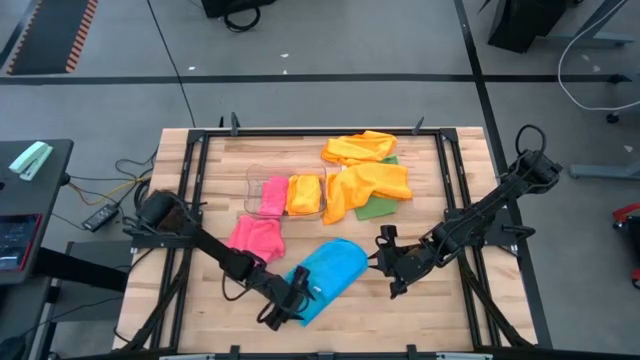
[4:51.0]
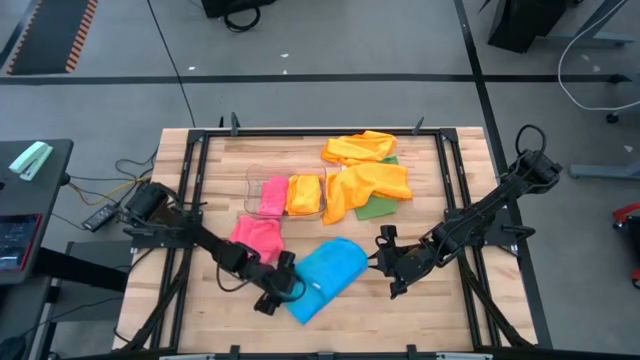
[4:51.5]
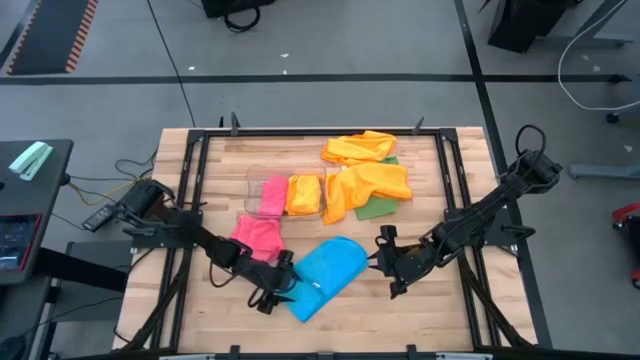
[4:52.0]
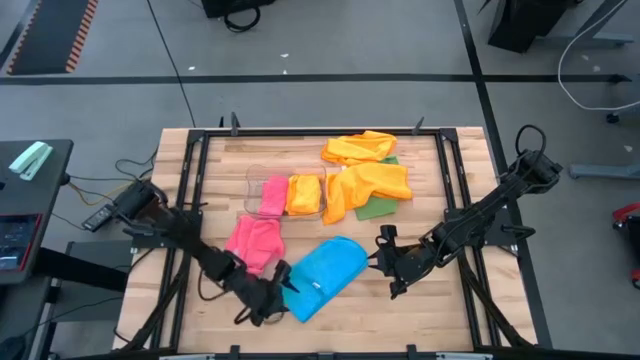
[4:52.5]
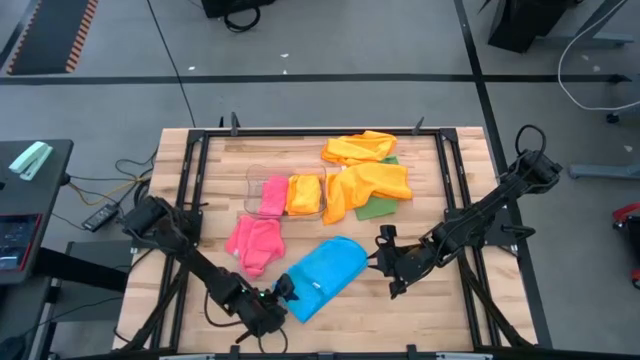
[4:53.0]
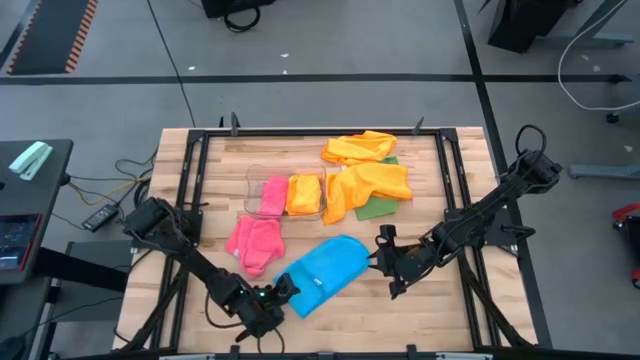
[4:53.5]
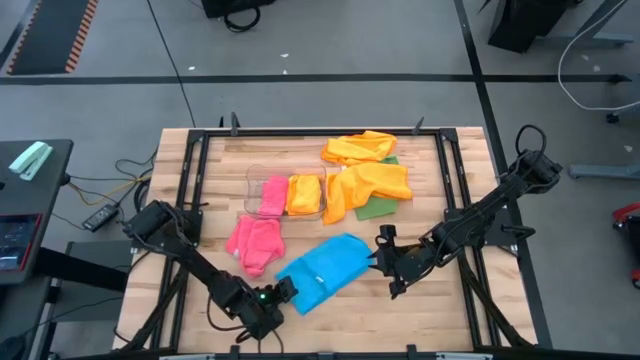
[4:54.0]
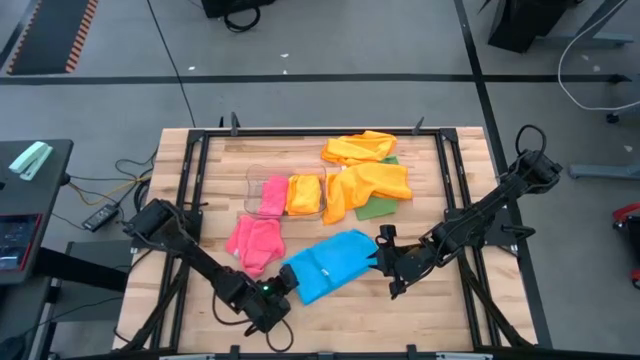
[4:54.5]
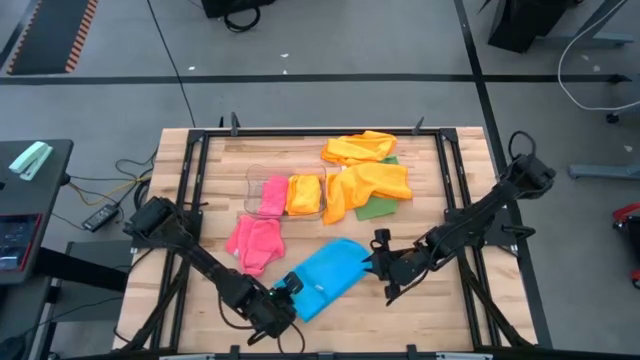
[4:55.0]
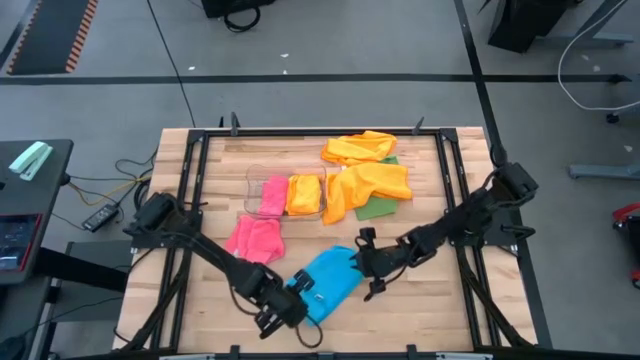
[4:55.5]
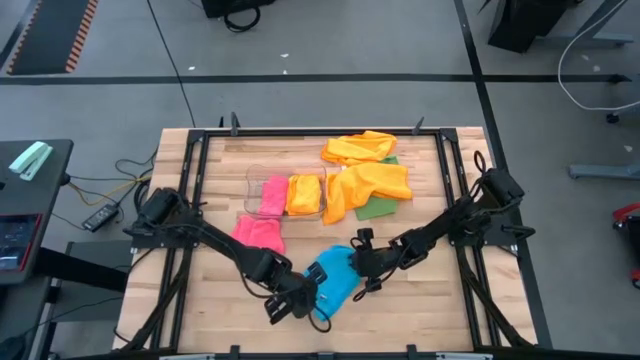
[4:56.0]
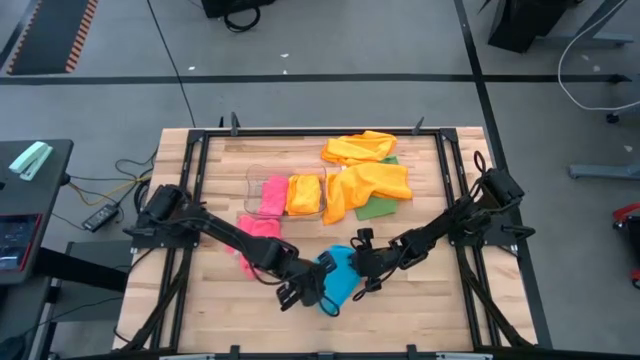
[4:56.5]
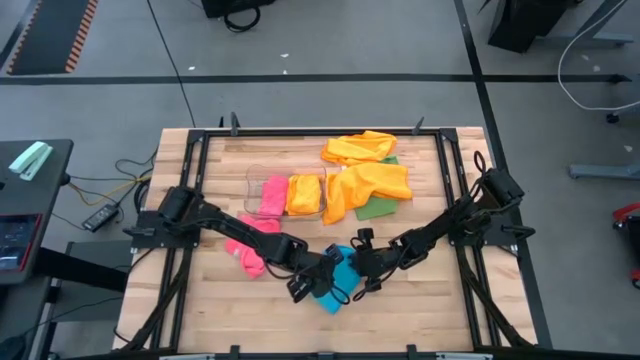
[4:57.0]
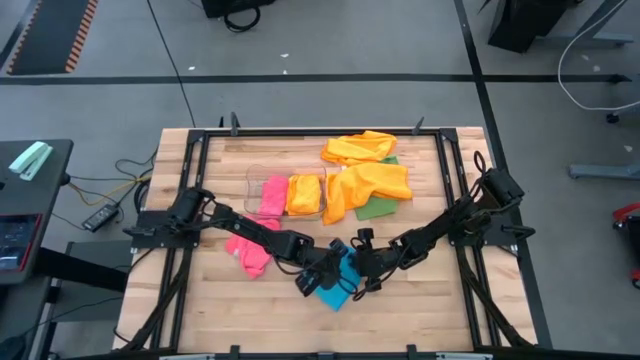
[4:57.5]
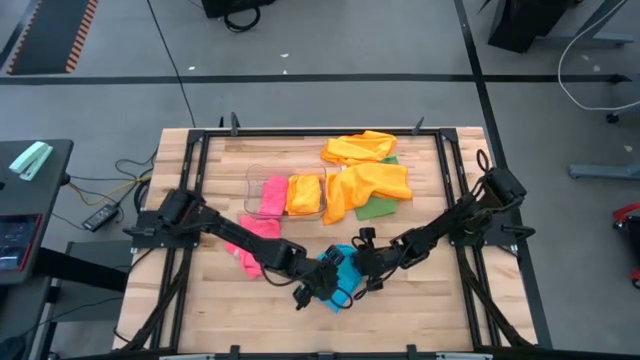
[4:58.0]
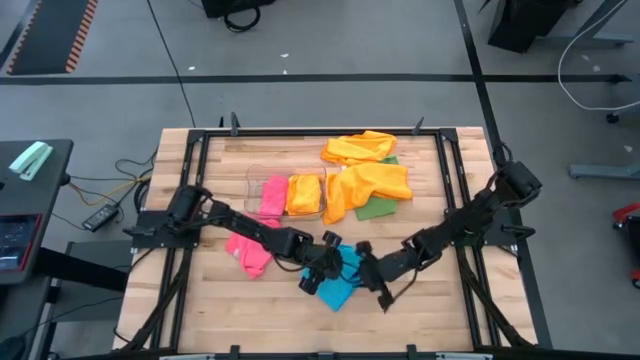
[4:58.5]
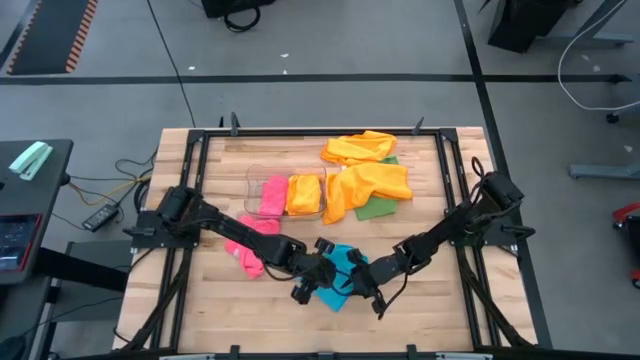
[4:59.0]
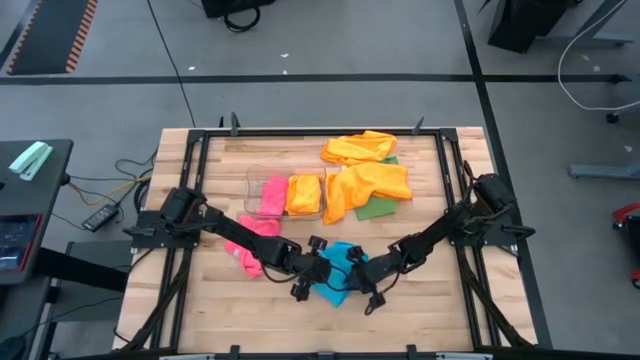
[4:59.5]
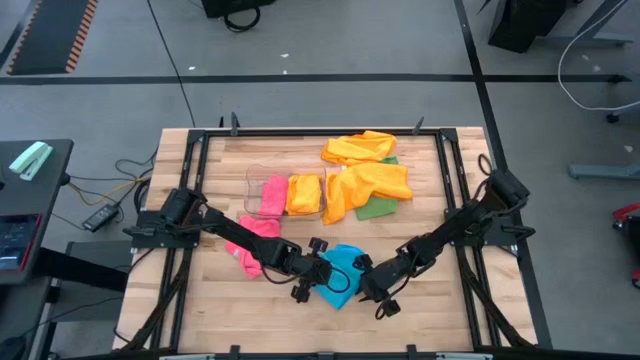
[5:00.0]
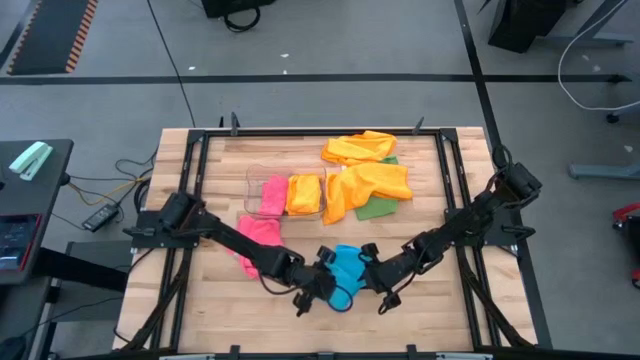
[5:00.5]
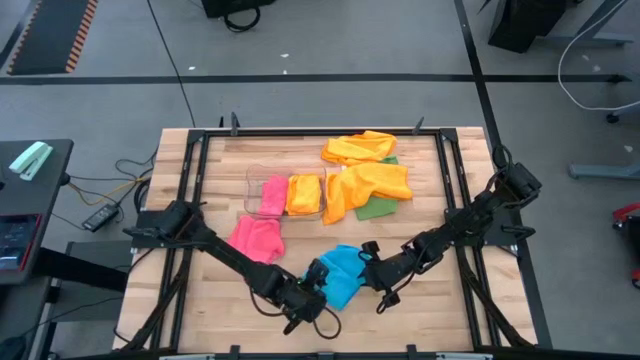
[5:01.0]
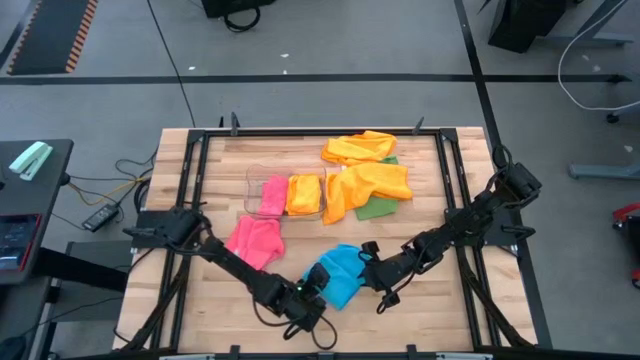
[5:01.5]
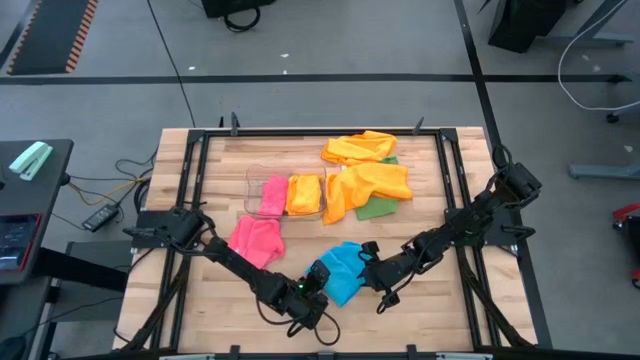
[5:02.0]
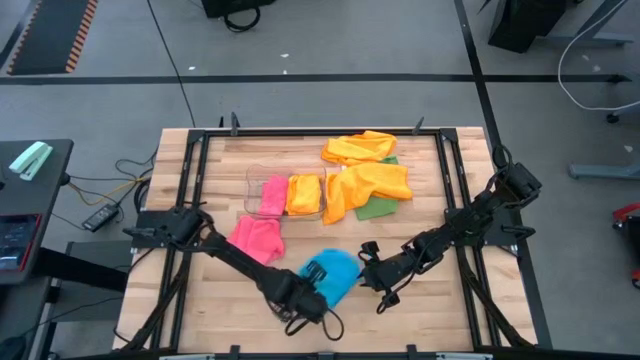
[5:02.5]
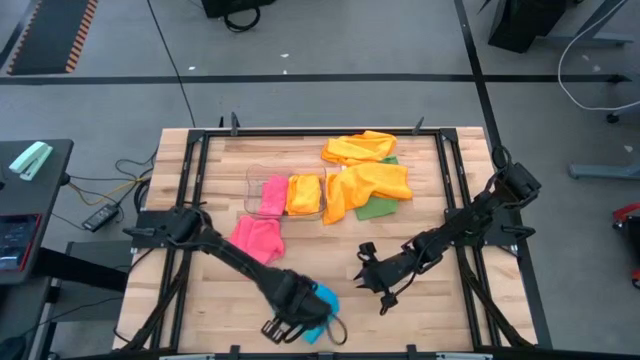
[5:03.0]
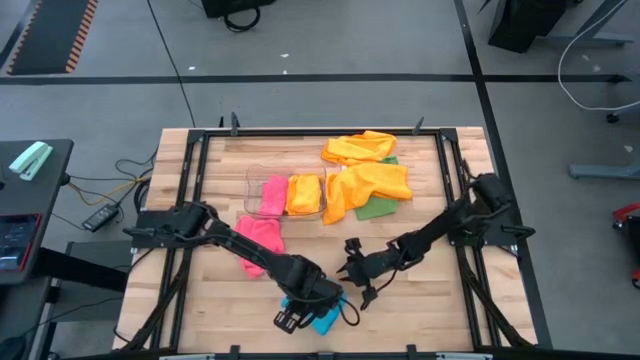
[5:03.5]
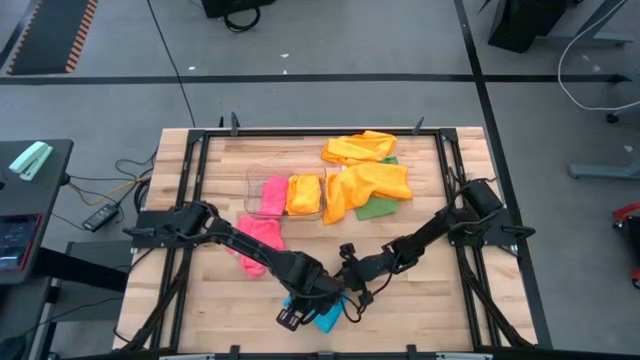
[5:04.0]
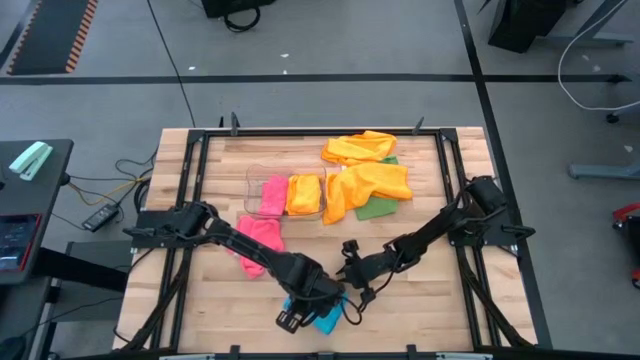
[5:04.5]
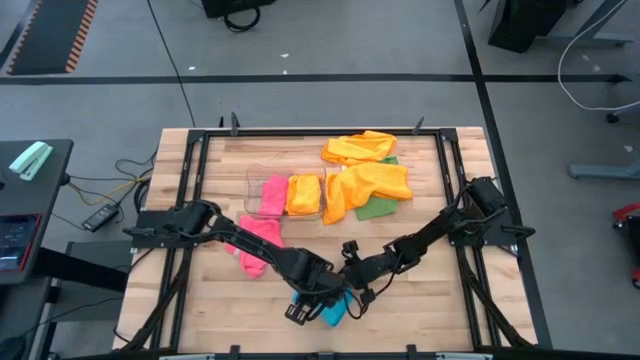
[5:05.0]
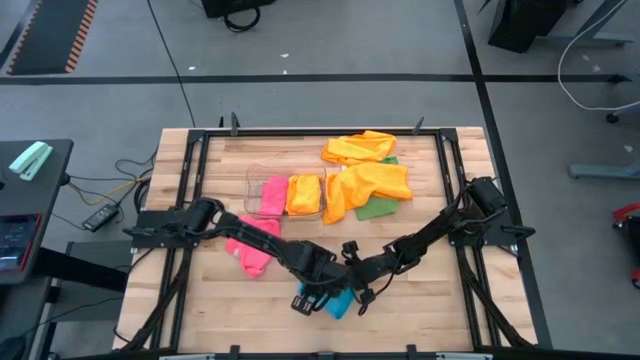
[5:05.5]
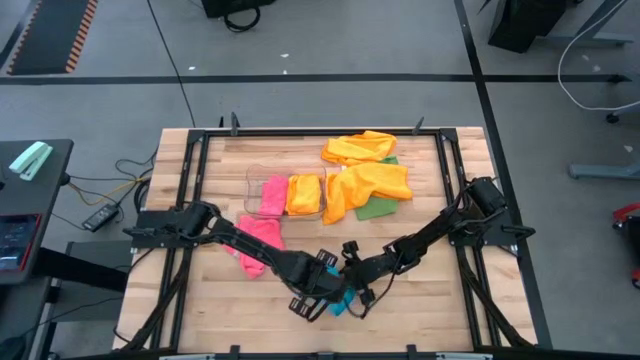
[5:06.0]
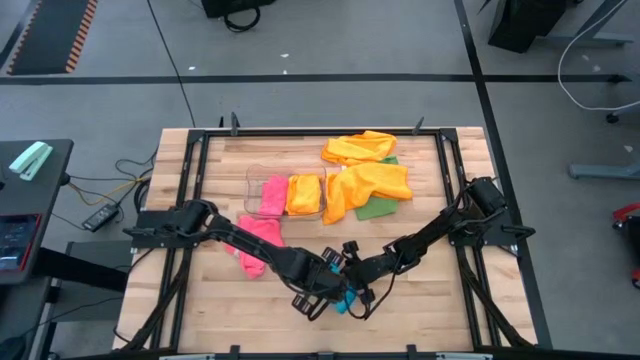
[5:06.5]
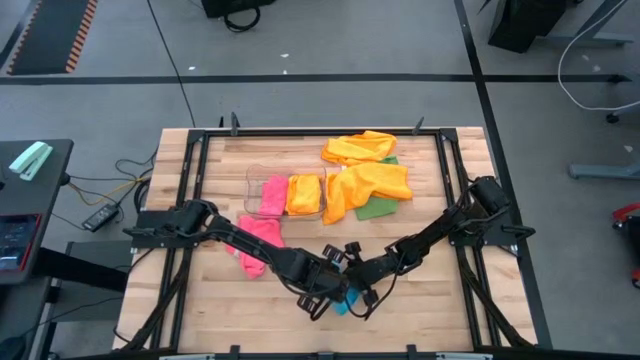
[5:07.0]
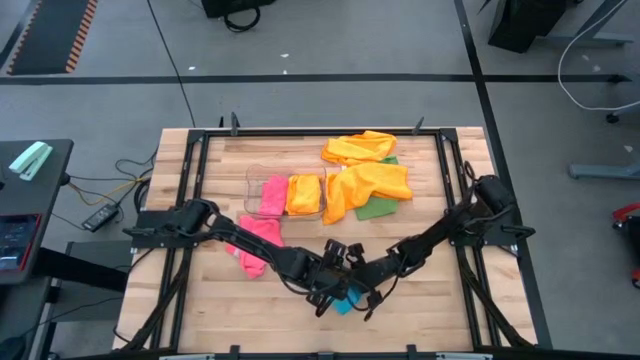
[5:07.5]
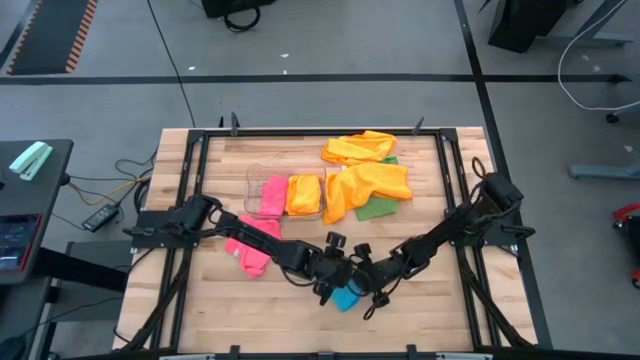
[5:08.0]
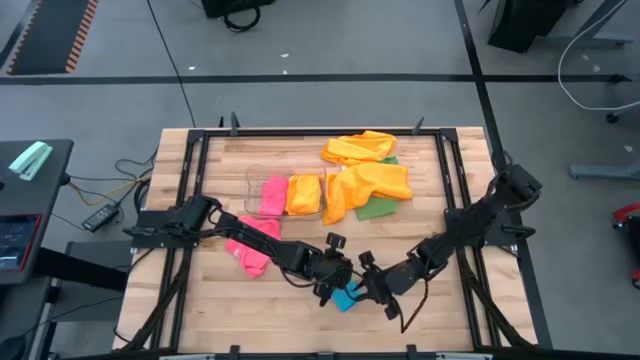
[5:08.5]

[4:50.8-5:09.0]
Task: Fold microfiber towels
Fold the blue microfiber cloth
